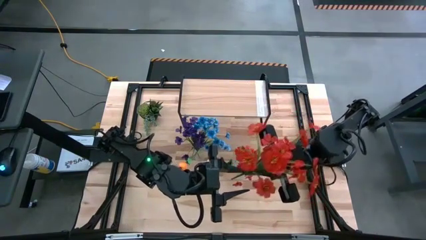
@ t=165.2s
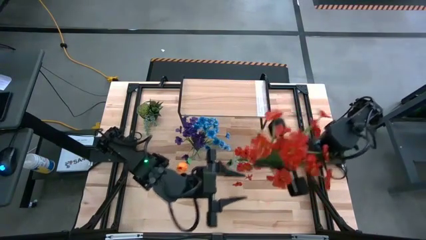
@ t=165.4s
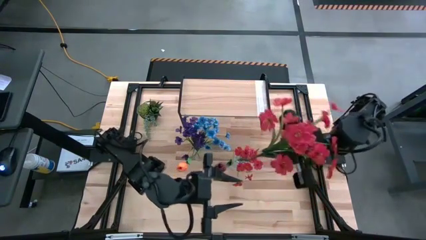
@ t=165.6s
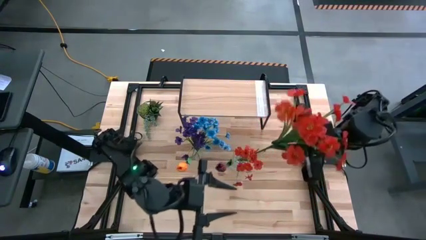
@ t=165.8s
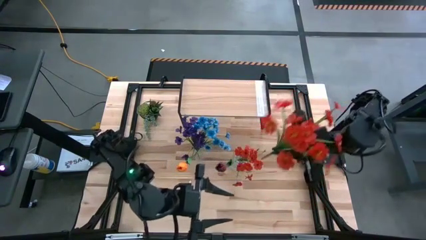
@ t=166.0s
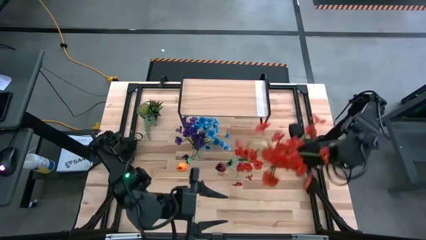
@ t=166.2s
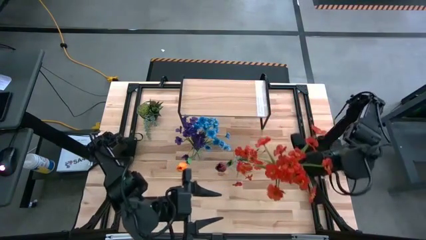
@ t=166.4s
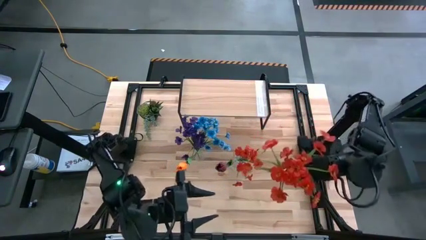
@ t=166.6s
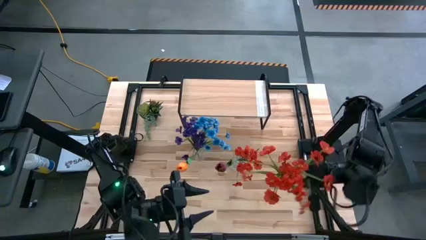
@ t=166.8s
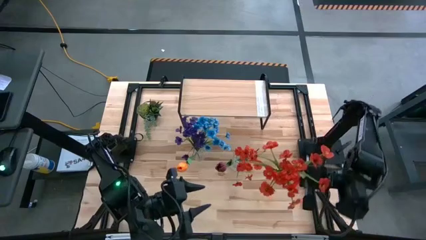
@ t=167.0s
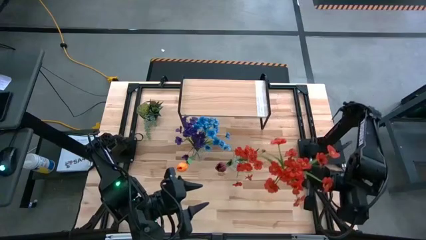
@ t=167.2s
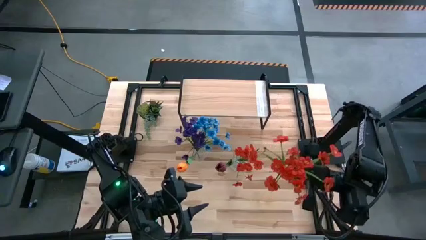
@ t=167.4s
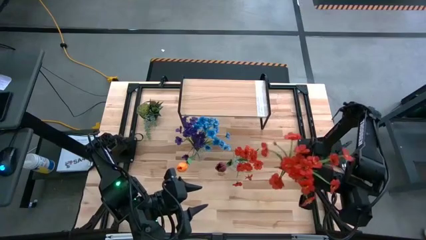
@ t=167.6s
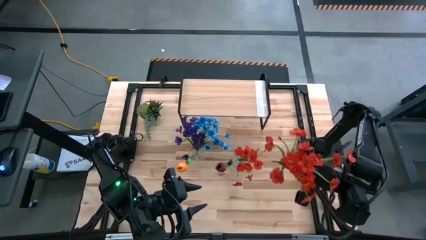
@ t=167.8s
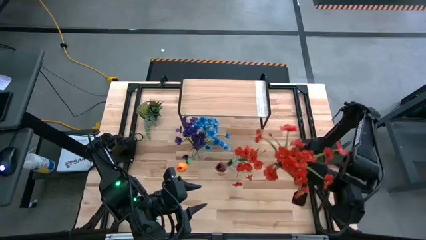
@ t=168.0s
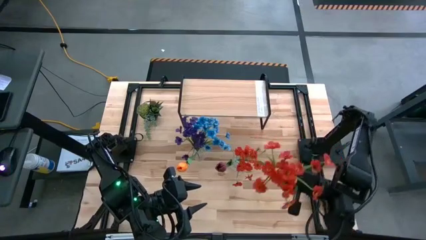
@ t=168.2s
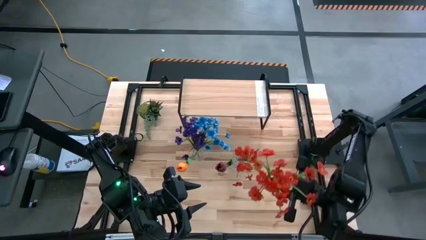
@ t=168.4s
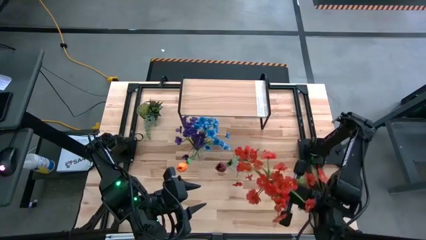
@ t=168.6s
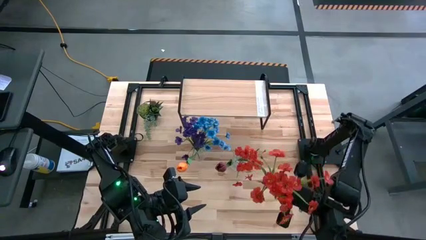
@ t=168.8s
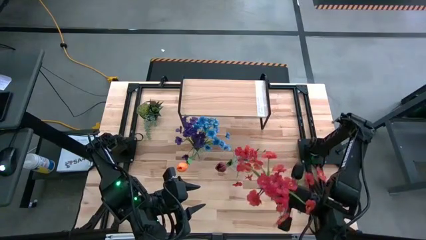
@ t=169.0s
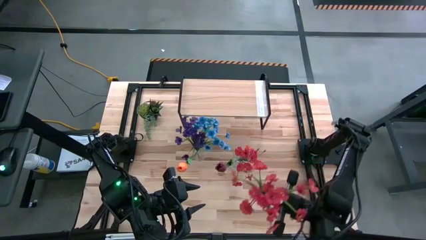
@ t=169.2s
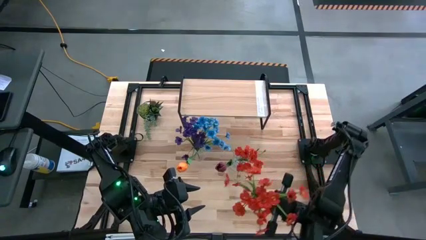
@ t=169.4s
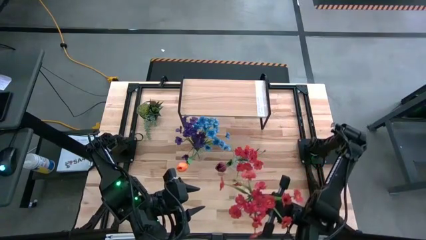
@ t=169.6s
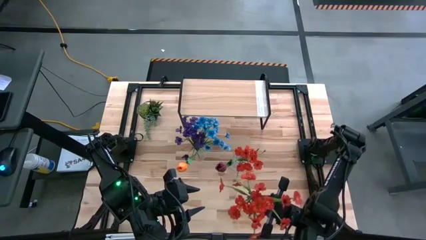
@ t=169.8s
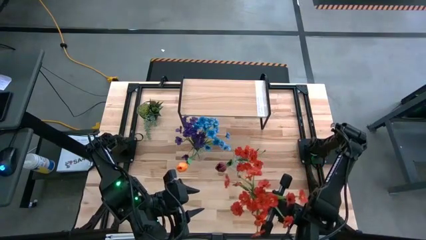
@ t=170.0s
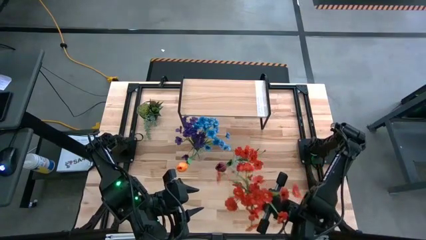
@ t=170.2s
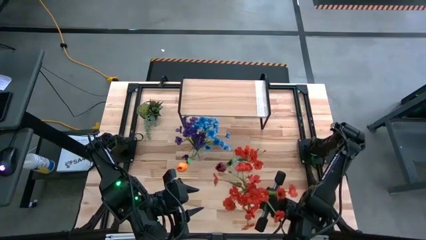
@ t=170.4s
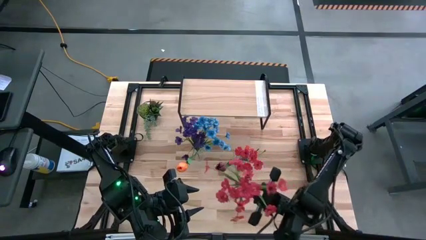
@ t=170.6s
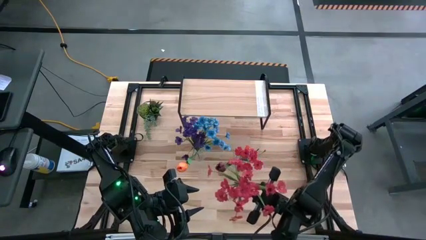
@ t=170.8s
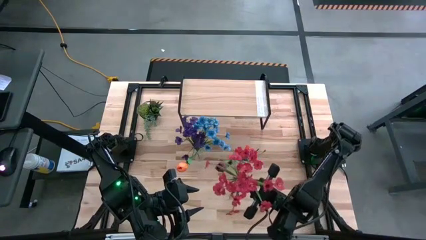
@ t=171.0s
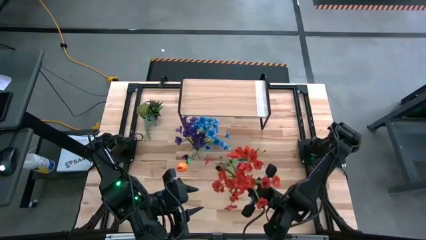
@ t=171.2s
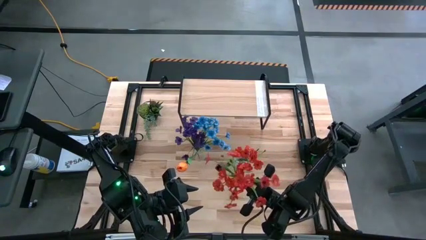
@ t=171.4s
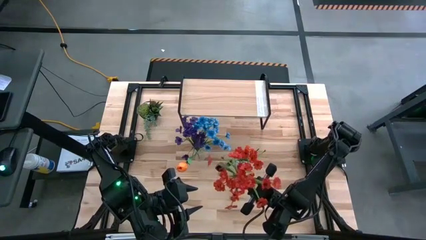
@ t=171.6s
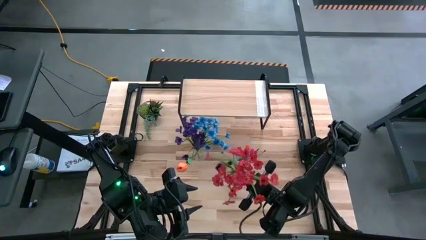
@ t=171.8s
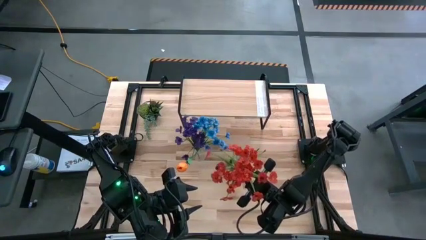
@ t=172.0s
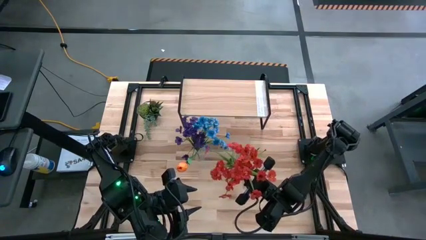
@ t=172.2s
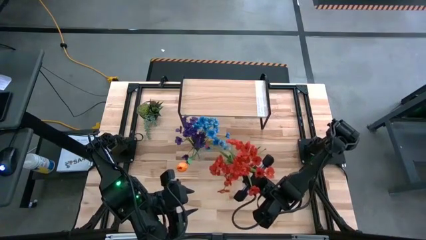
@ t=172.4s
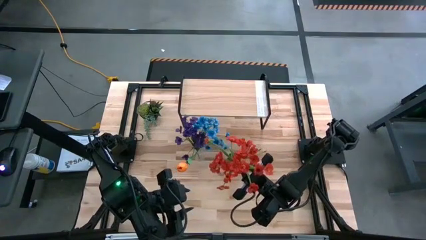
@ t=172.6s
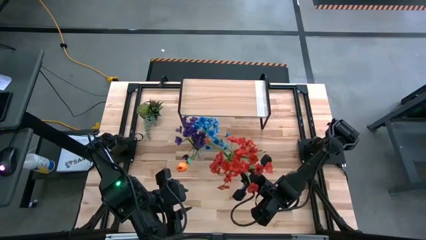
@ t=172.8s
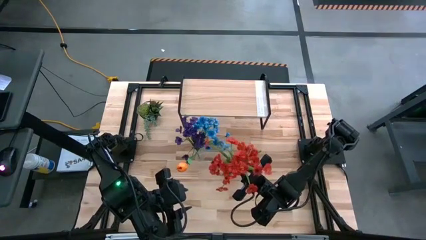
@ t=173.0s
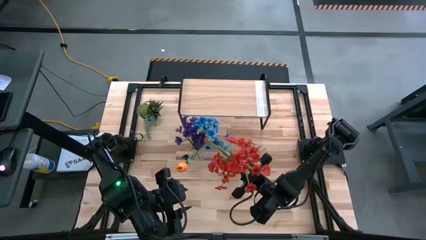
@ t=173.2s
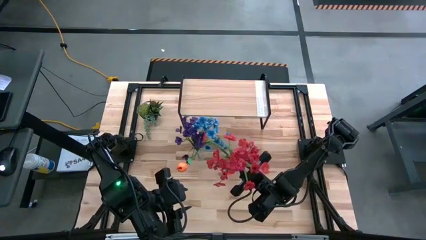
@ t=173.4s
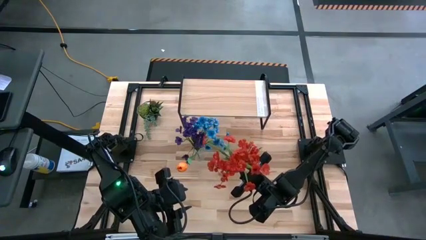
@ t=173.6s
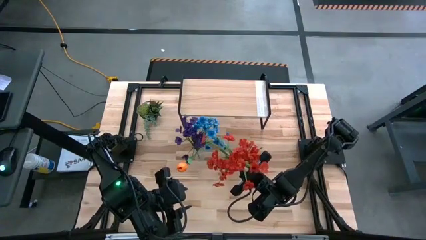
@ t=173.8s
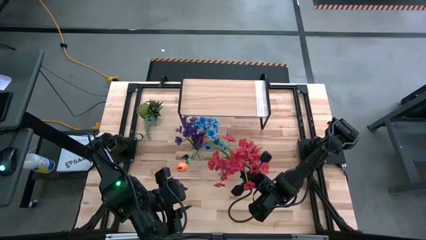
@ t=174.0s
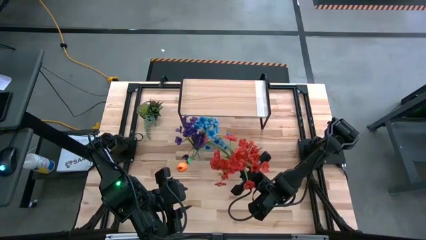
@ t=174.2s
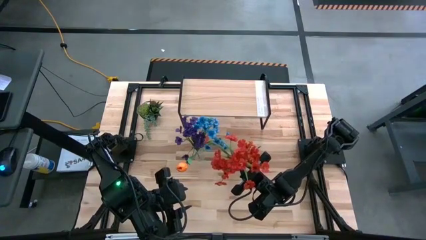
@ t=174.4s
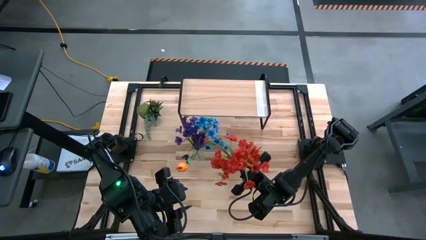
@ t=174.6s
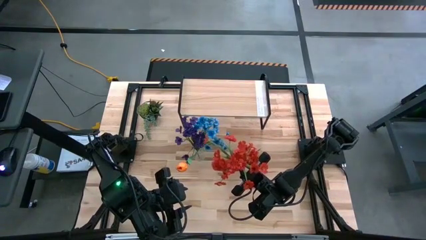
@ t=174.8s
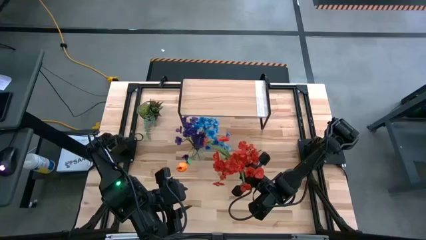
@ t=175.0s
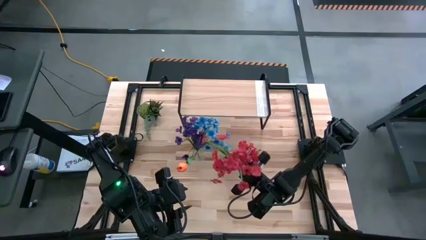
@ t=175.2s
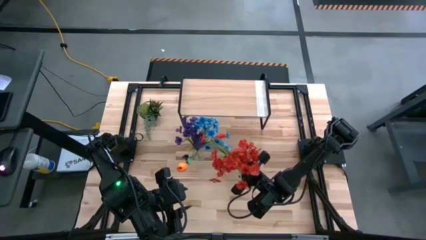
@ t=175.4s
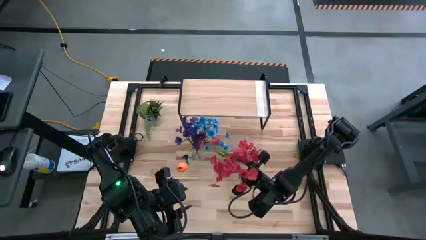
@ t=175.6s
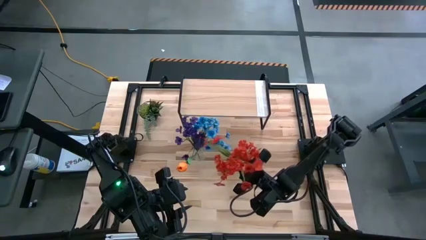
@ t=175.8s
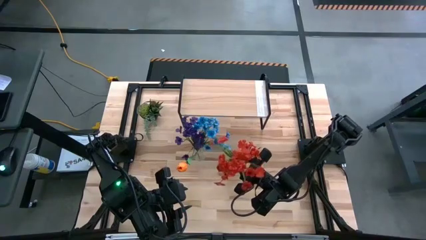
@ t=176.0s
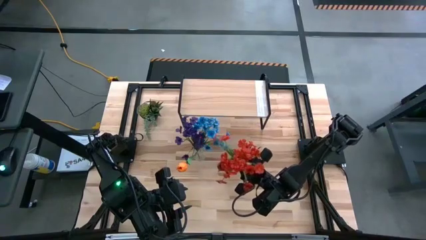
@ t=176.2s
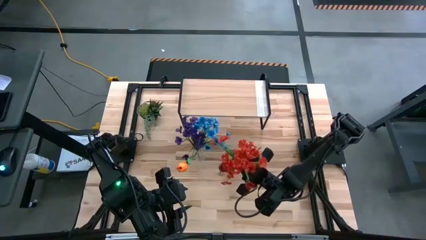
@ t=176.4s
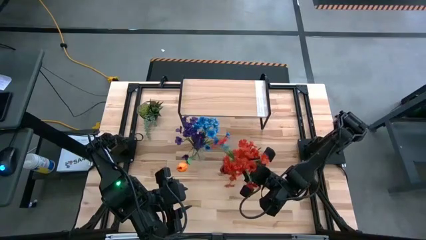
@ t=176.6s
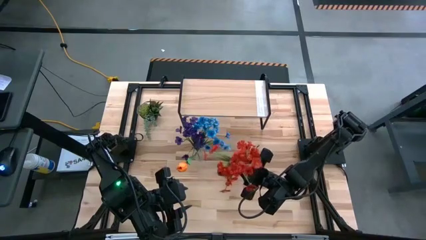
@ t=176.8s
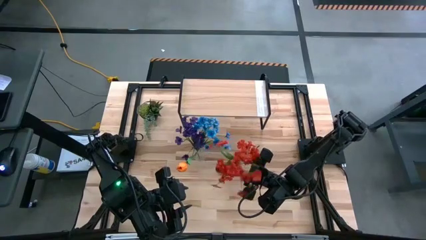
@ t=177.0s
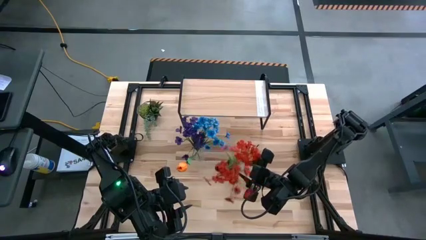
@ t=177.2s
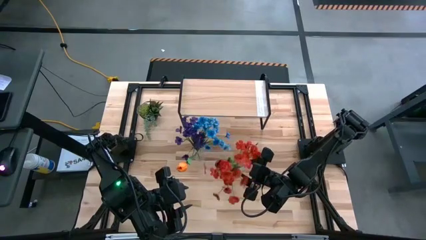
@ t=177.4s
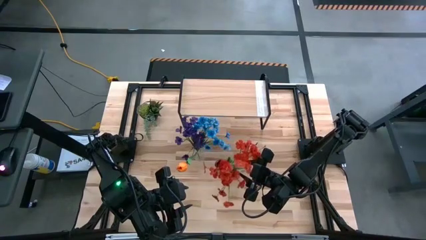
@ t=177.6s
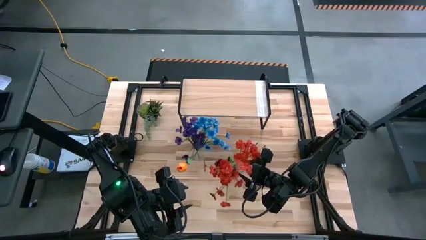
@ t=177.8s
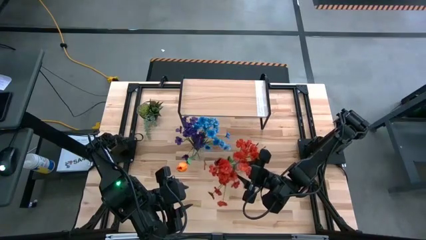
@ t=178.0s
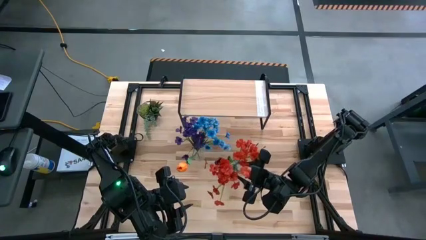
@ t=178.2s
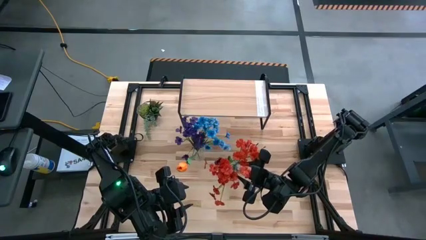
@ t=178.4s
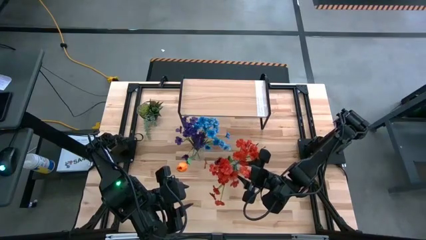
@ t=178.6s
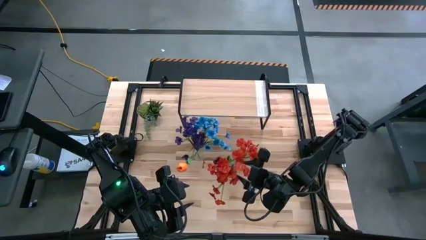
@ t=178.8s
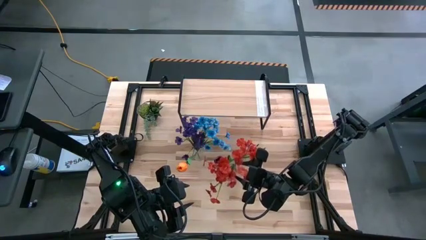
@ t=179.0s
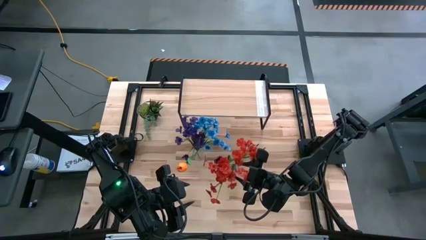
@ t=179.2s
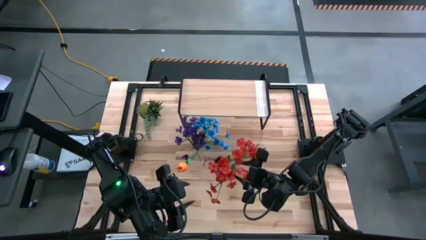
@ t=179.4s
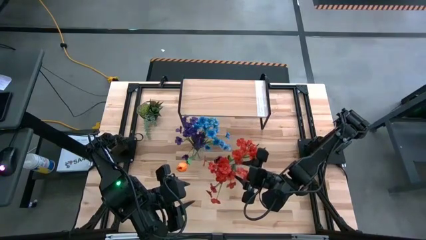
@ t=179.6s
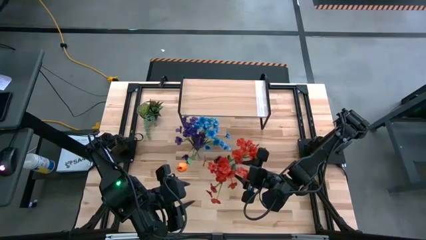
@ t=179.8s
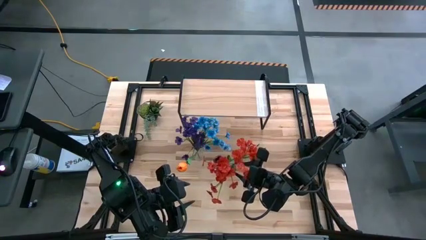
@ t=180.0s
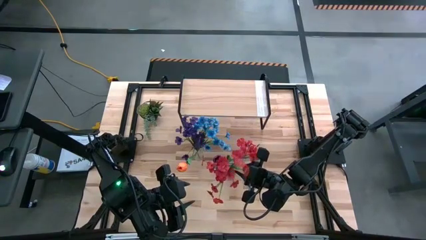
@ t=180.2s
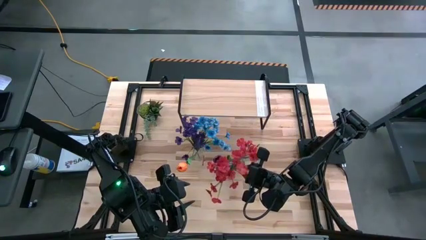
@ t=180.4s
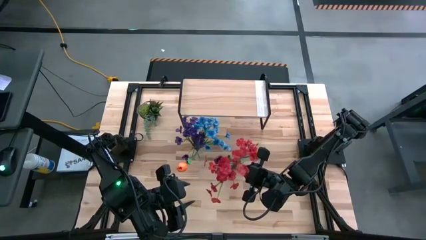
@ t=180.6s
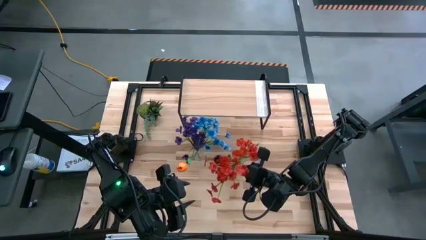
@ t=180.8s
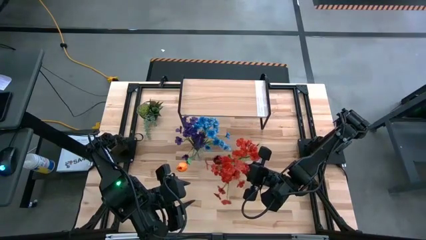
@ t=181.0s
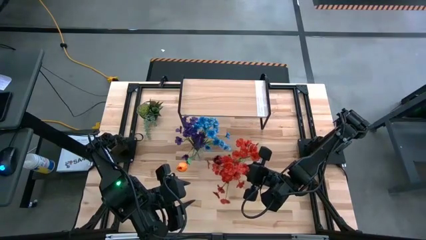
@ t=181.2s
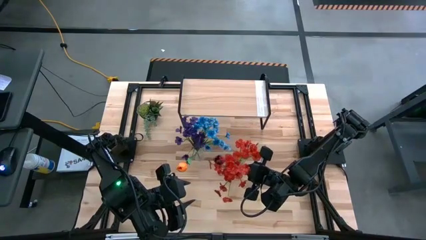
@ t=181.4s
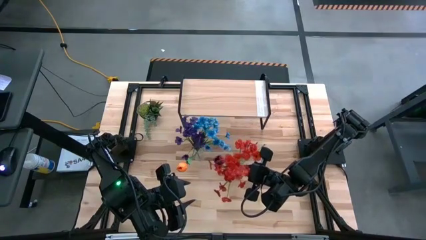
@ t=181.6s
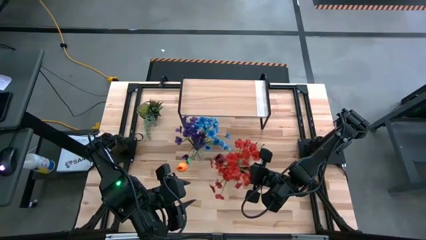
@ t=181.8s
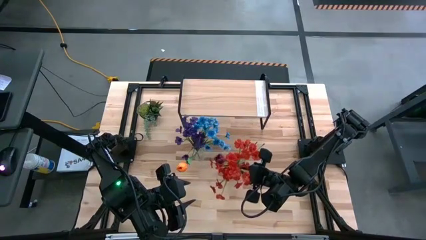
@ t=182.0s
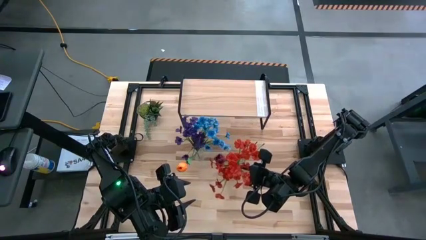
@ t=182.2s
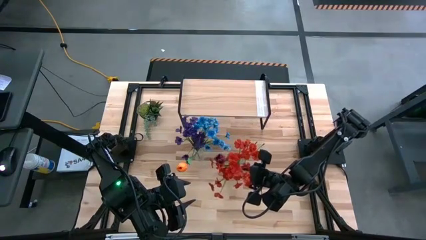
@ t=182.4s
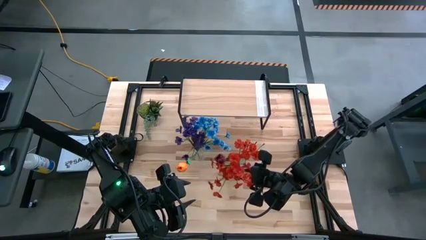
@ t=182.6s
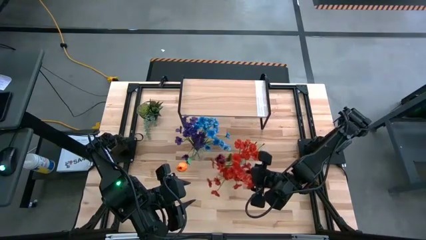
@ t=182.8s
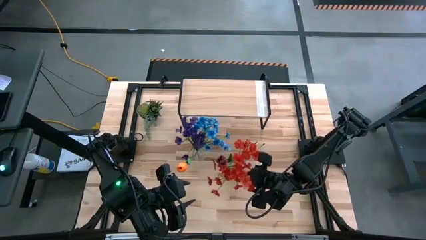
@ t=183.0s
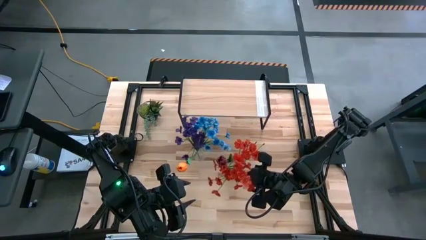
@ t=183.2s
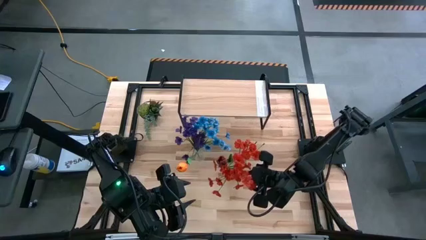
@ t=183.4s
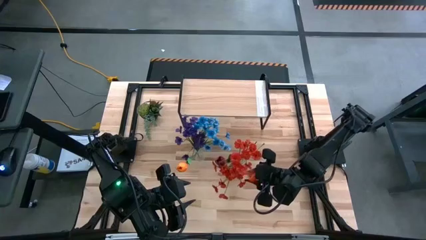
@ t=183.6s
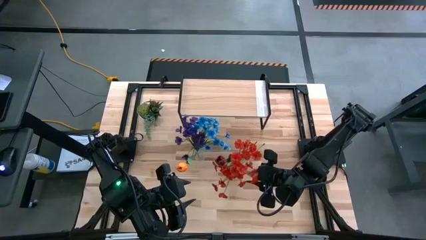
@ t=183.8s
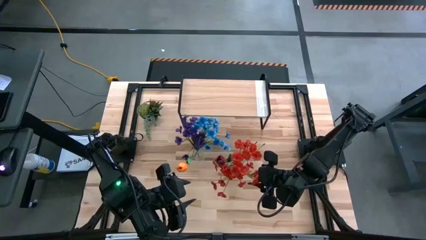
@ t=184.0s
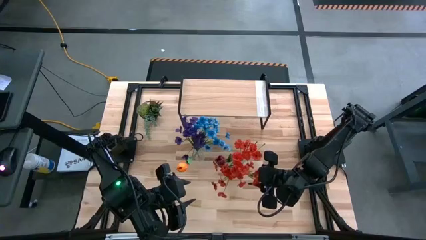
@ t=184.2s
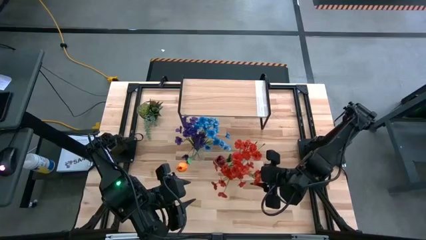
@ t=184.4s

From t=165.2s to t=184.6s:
Task: Pick and place flowers into a vace then onto a shelf
Put the red flower into the right transparent crystal vase
